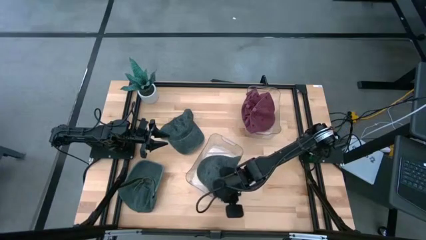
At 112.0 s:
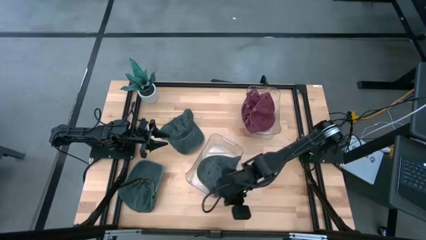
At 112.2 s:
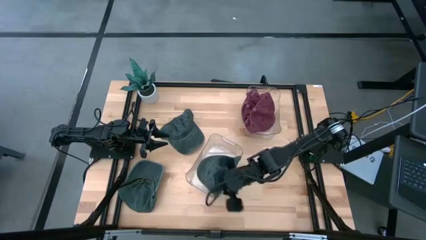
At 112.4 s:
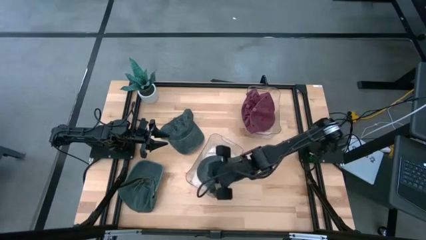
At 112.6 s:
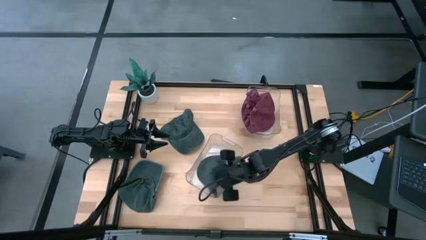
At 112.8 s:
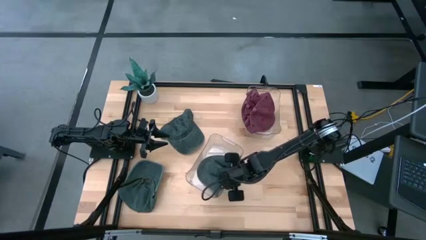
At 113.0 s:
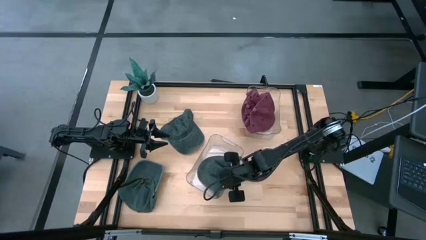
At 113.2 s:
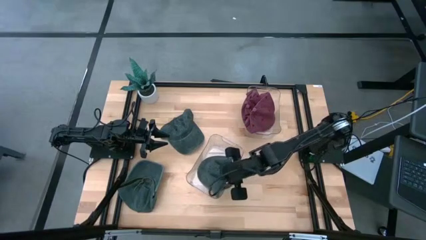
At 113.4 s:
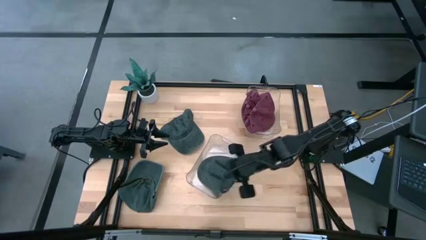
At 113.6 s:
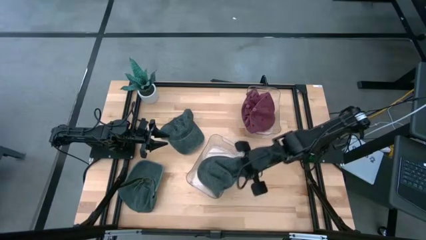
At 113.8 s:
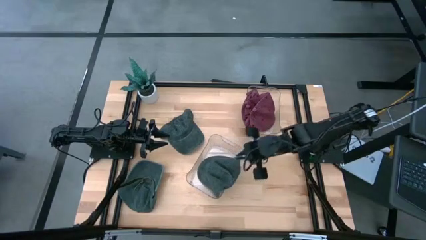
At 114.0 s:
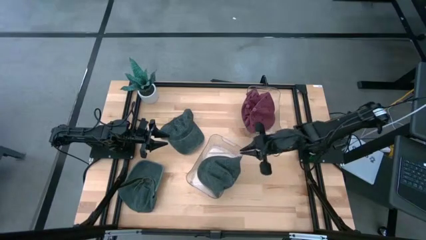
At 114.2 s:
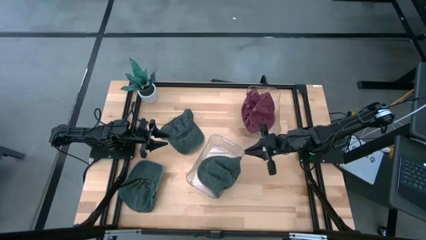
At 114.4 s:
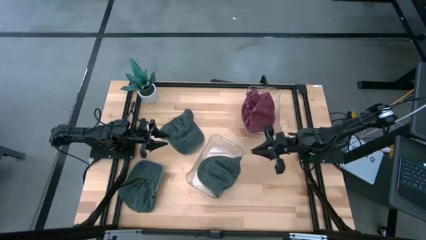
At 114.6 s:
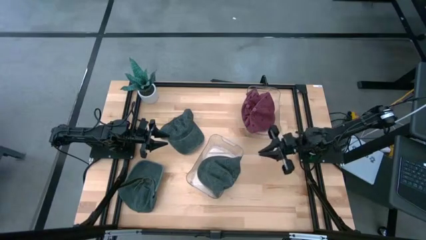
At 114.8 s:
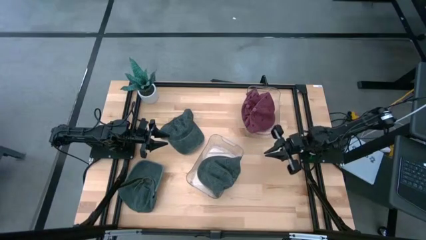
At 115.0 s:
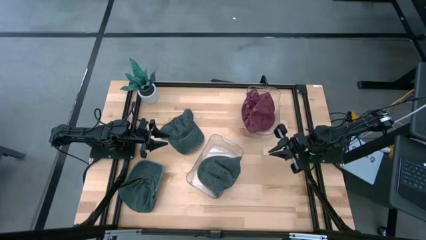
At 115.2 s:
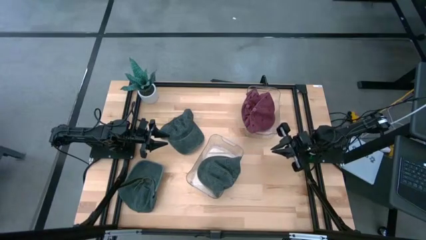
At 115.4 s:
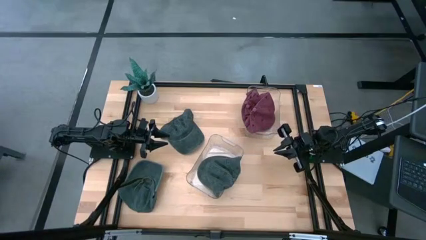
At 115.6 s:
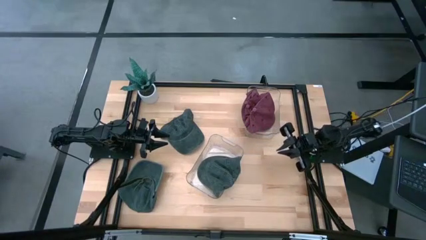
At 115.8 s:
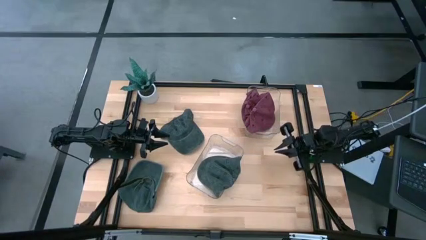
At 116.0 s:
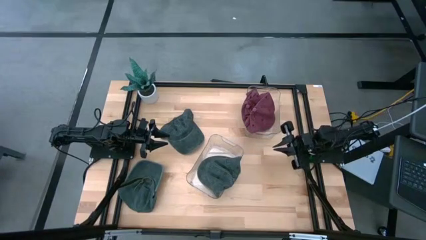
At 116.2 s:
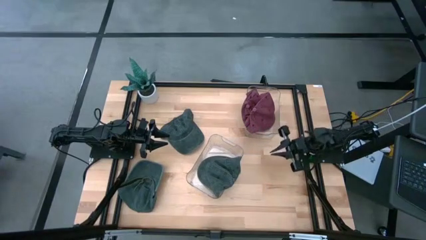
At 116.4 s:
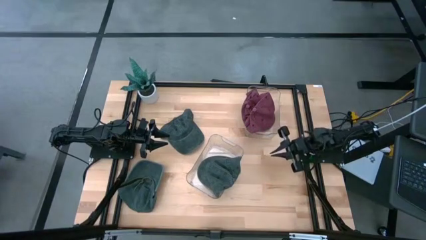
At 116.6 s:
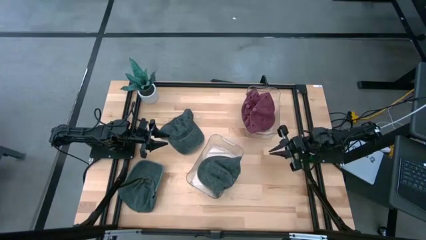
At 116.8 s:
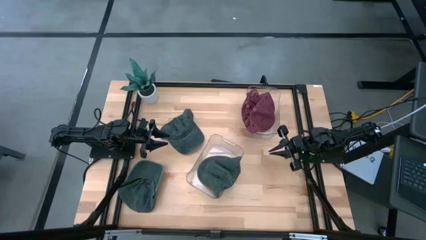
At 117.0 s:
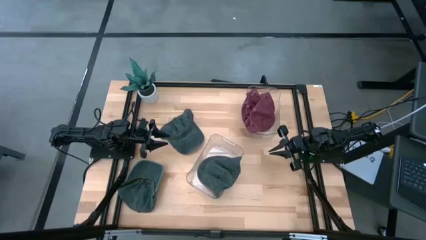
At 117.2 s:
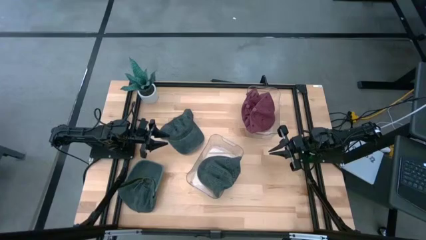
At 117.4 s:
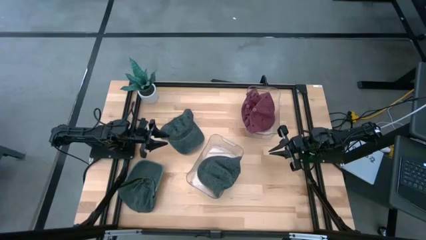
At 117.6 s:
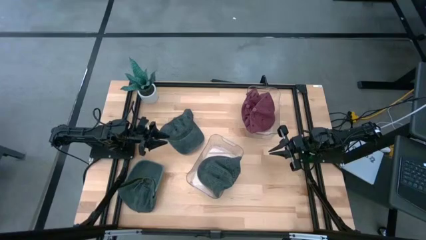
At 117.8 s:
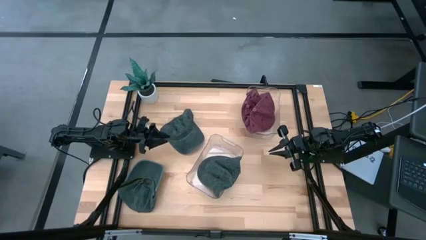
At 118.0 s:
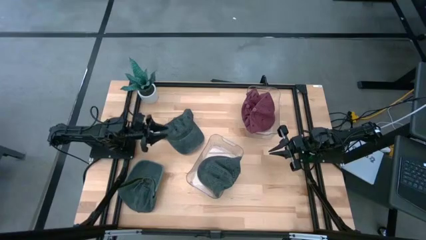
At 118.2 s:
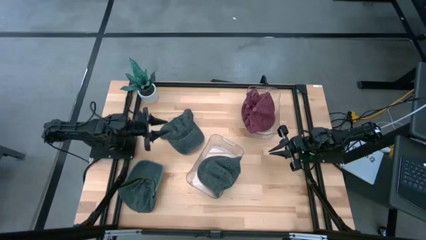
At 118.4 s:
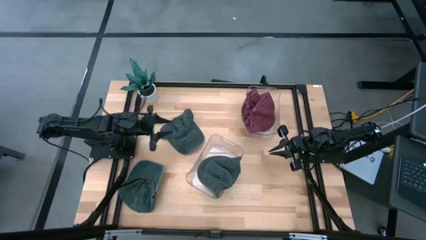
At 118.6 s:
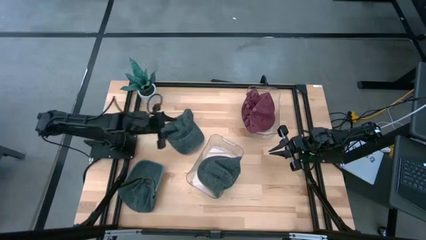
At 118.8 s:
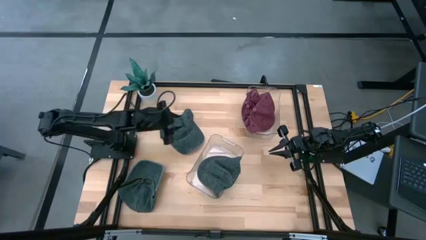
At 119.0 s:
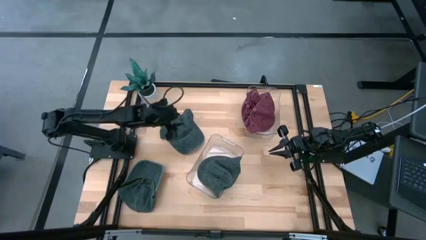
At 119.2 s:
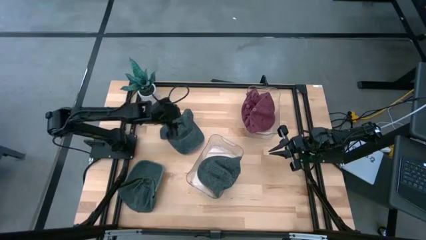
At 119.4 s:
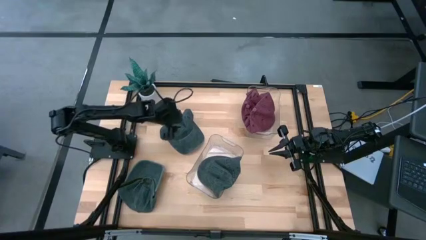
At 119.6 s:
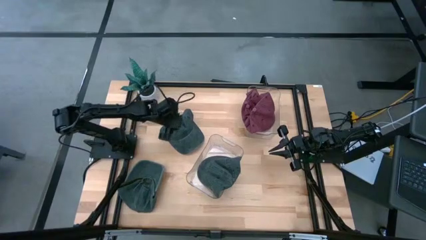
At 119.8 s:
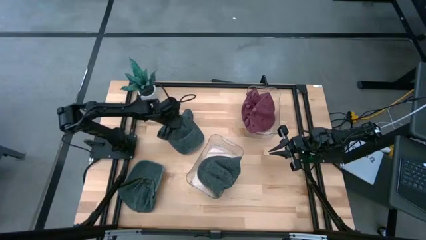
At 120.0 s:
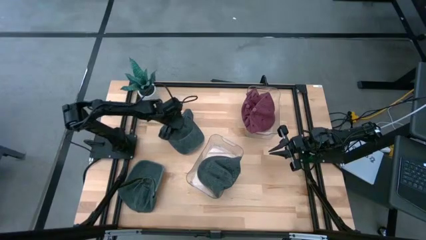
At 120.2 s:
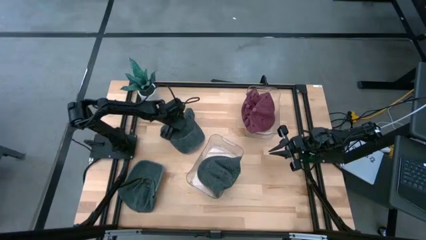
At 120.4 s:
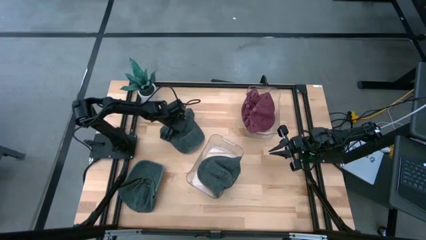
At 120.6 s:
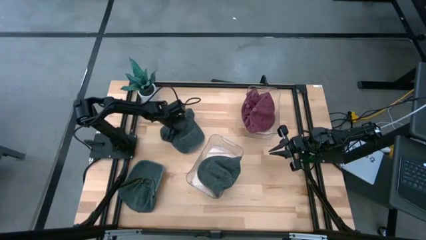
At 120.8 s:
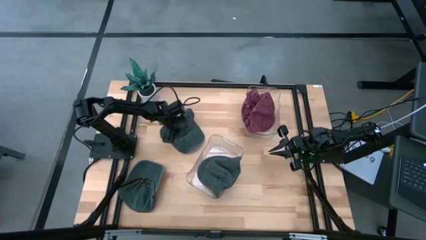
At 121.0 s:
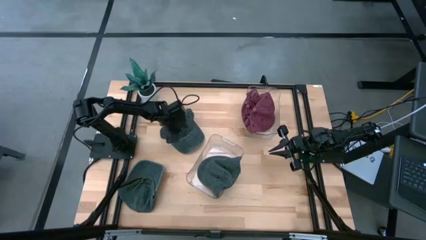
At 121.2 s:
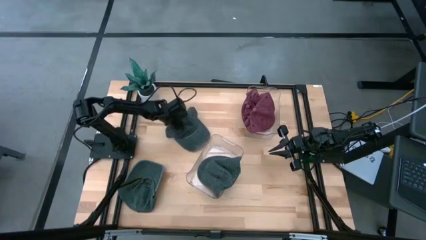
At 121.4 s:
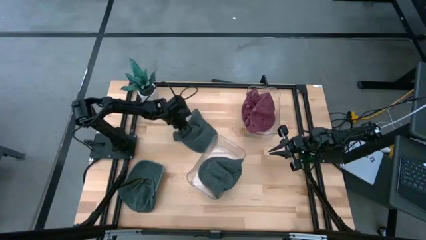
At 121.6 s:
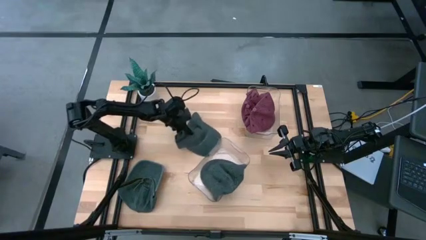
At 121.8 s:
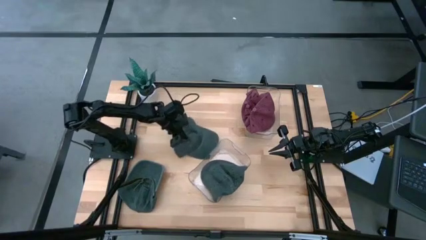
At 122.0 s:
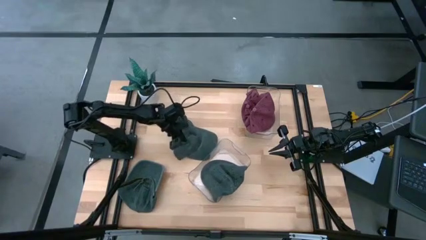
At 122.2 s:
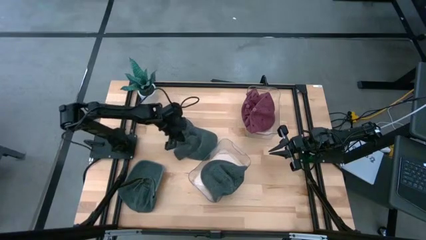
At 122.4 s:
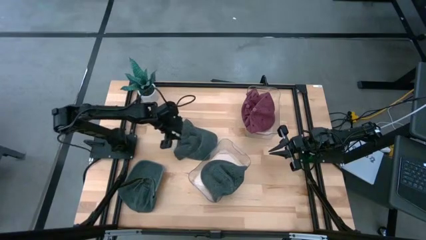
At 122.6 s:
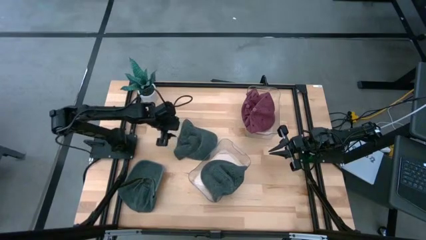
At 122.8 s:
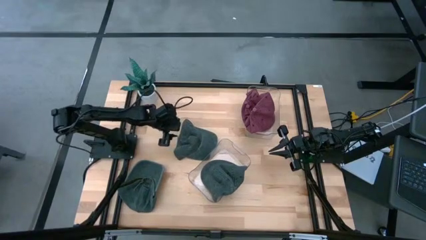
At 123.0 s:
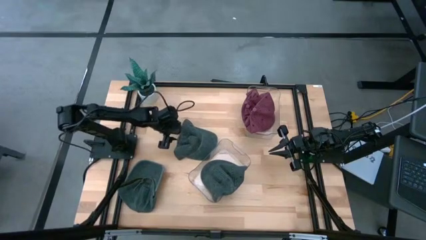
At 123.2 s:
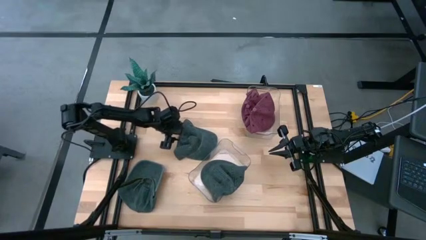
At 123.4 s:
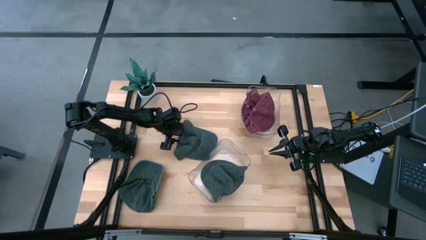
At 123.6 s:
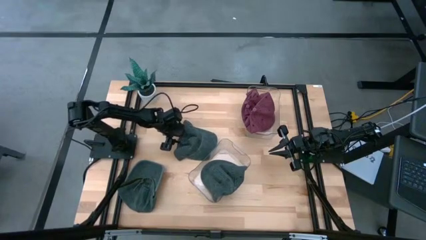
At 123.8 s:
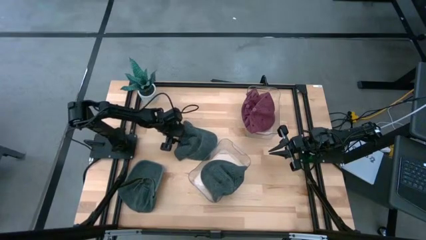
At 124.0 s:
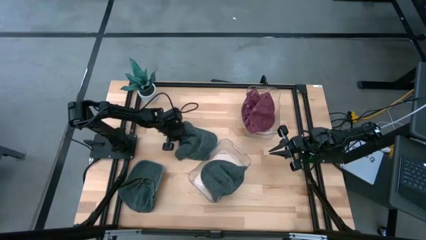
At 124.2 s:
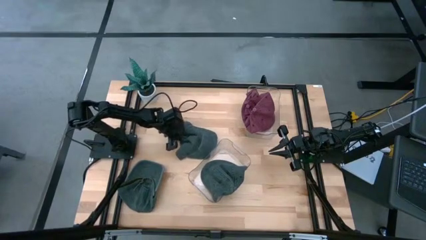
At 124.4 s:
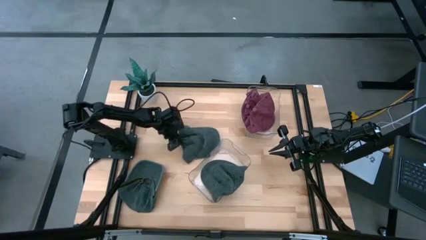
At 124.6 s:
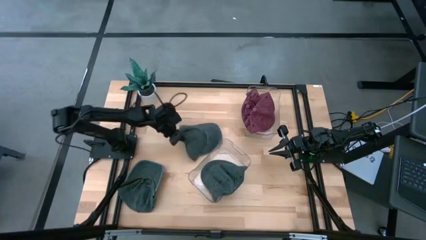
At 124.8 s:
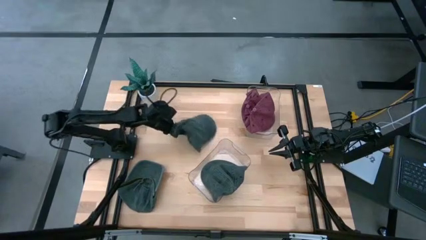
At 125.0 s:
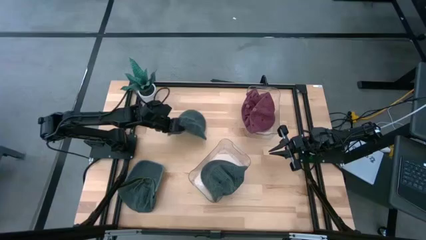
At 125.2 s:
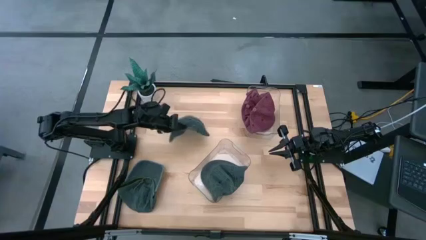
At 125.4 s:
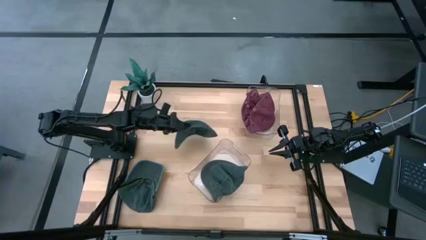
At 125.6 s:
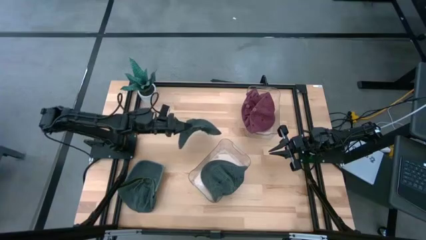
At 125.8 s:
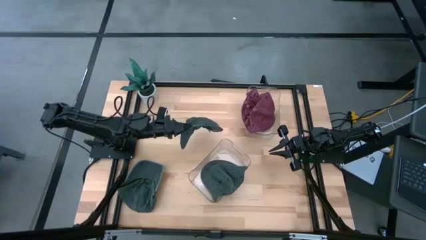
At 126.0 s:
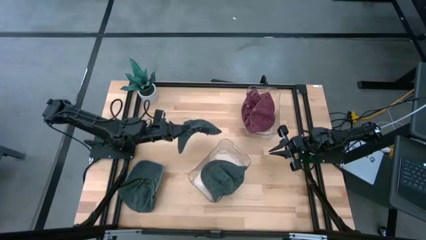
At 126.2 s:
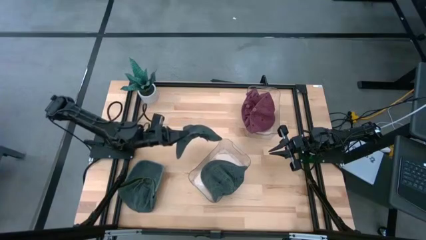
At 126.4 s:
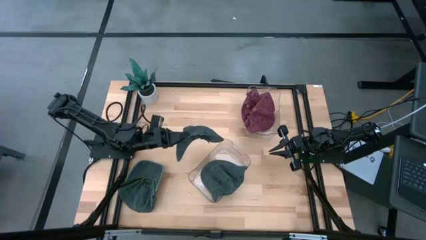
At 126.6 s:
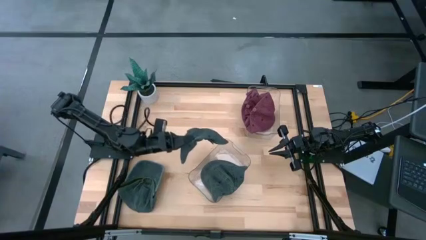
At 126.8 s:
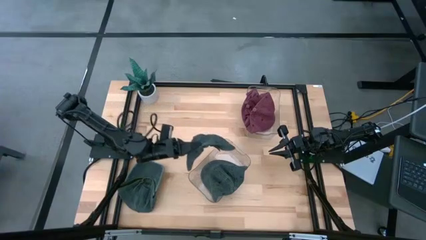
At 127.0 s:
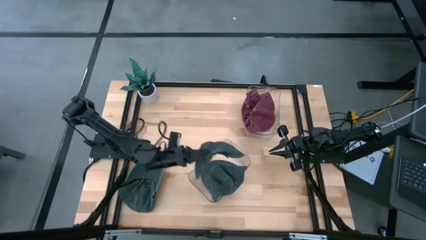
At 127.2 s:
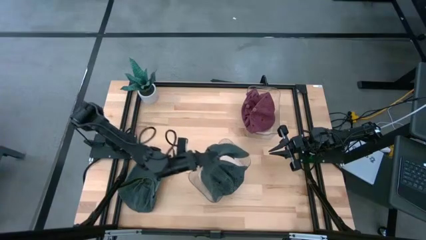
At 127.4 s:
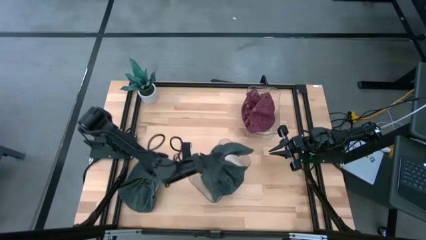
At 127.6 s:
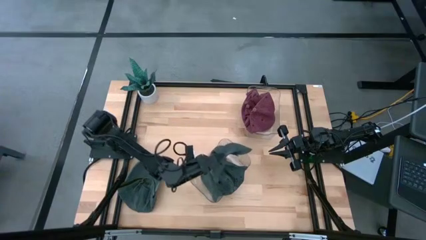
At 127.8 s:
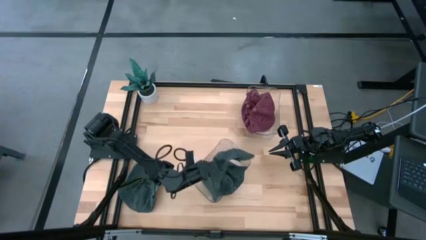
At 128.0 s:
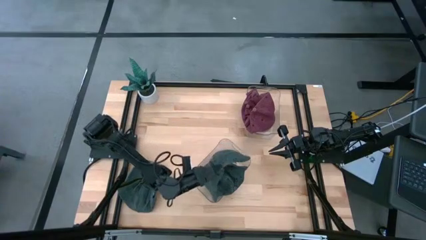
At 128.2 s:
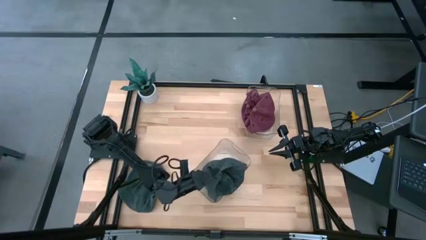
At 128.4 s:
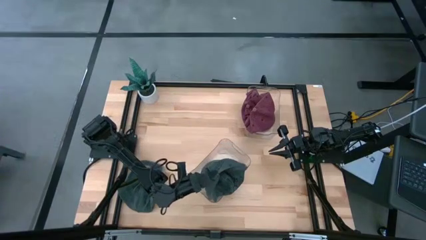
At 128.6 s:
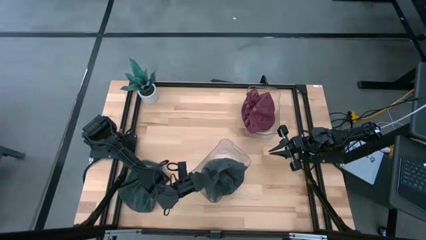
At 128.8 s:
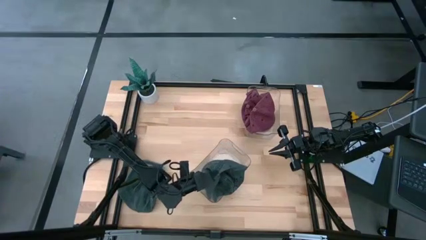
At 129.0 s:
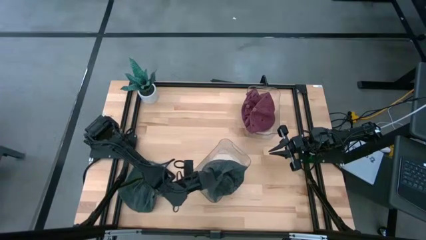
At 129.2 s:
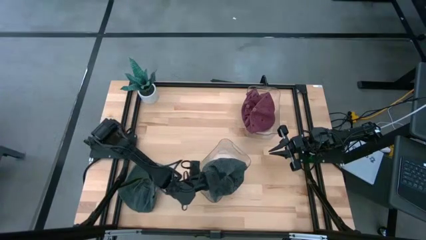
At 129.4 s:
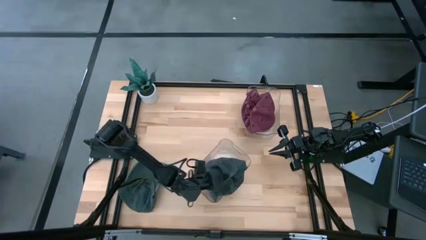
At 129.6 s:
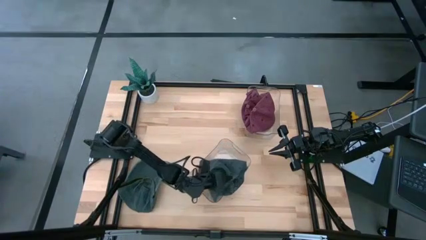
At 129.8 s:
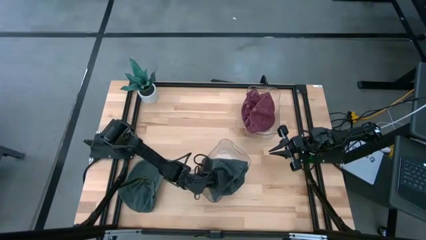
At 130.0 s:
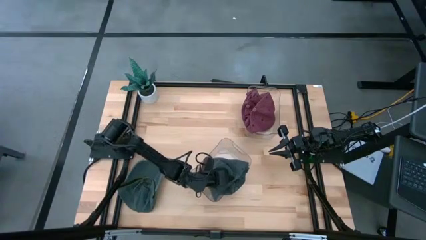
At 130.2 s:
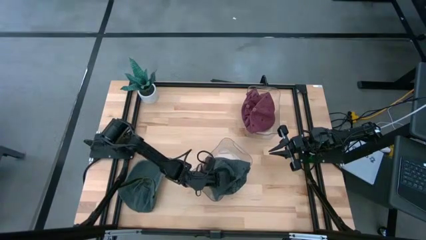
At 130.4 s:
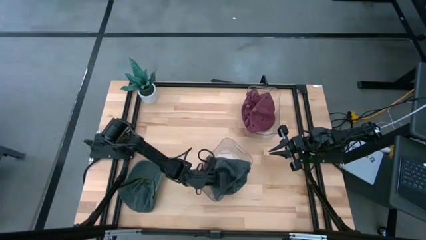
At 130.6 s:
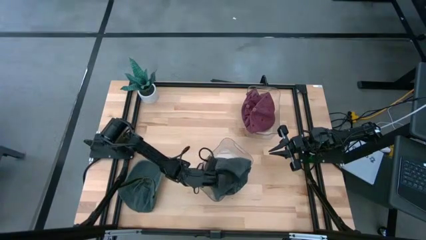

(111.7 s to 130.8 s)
Task: Pick & Place hat
Put the black cap into the bottom transparent bin
